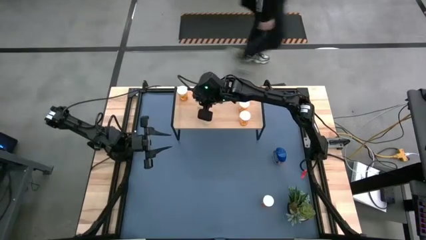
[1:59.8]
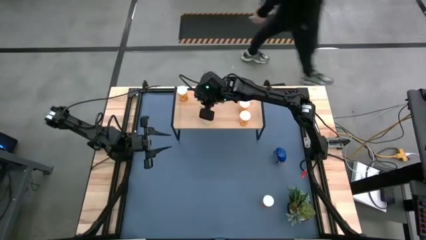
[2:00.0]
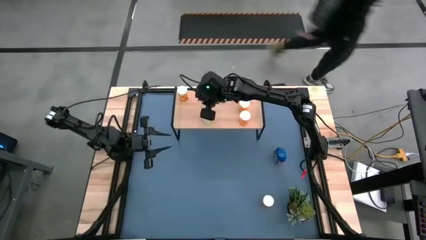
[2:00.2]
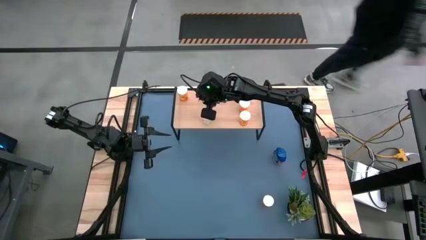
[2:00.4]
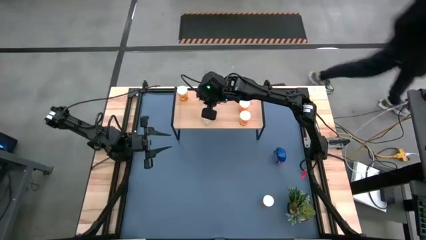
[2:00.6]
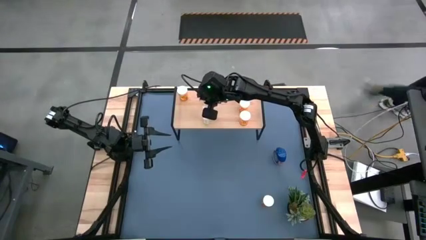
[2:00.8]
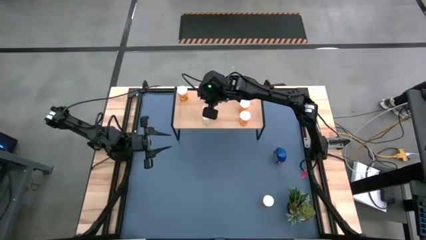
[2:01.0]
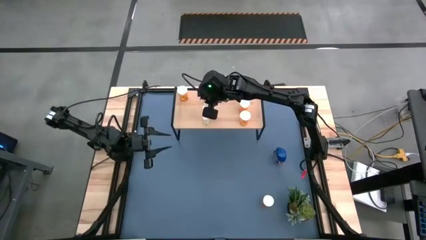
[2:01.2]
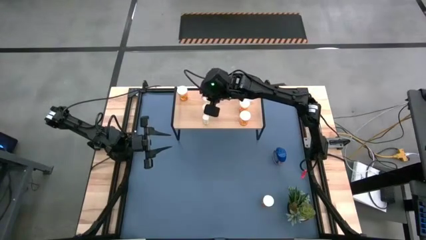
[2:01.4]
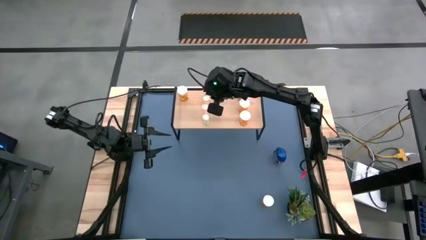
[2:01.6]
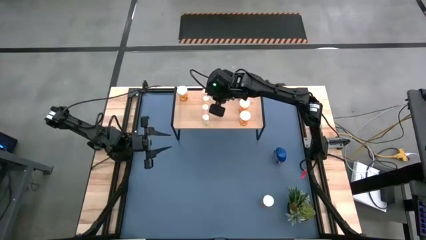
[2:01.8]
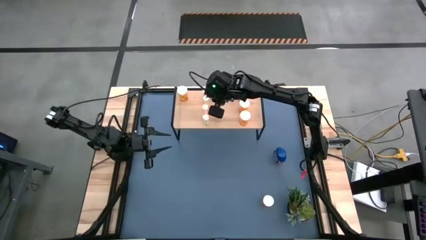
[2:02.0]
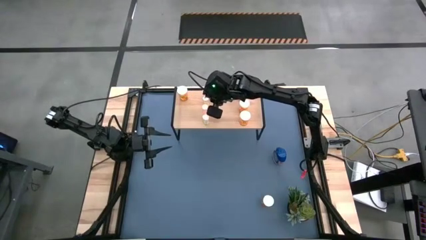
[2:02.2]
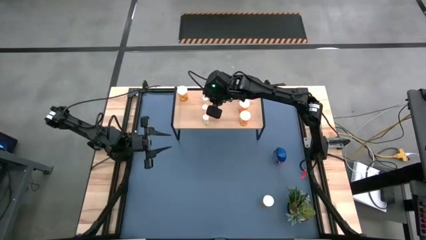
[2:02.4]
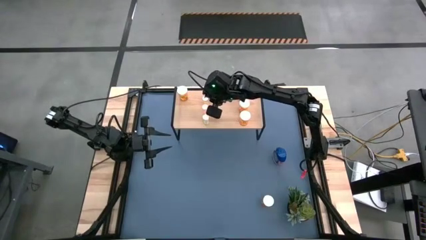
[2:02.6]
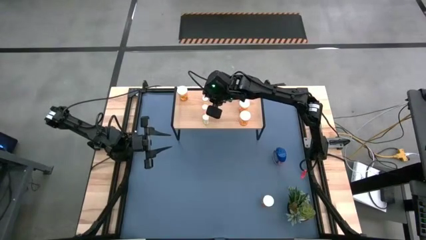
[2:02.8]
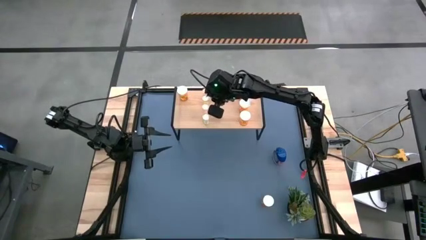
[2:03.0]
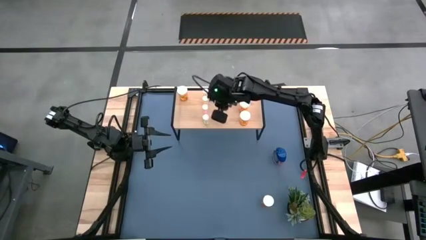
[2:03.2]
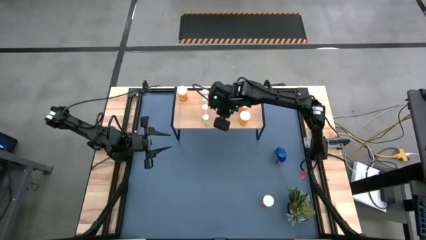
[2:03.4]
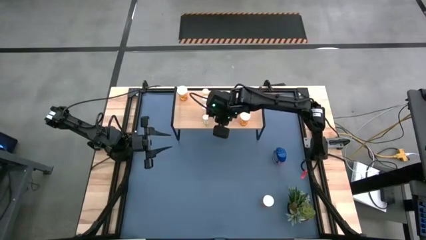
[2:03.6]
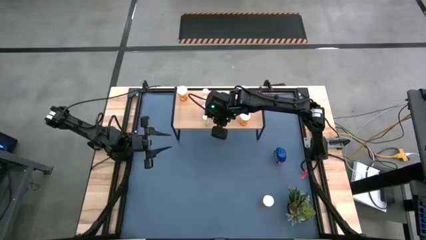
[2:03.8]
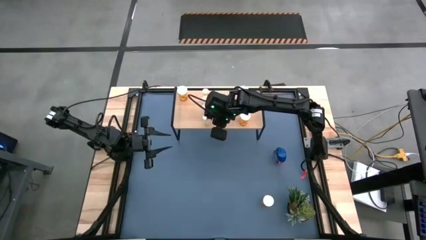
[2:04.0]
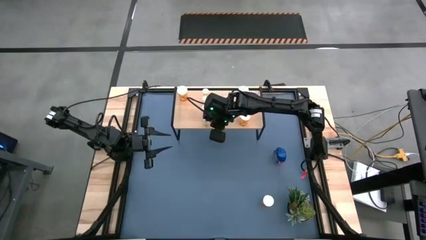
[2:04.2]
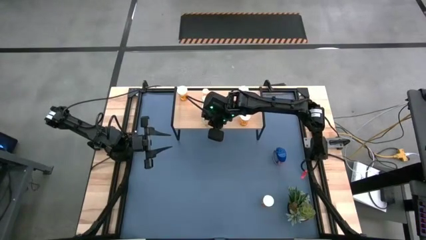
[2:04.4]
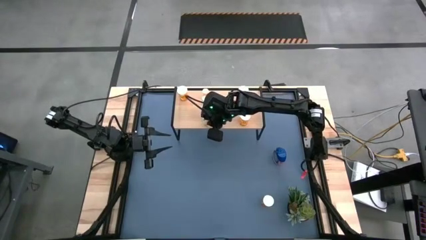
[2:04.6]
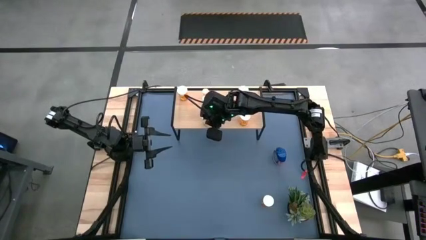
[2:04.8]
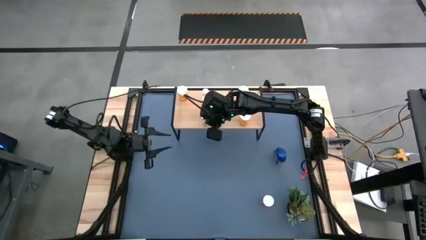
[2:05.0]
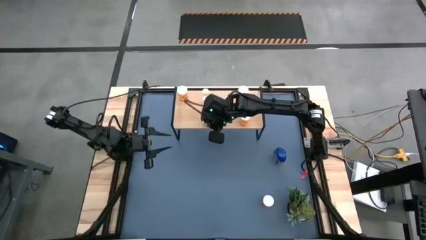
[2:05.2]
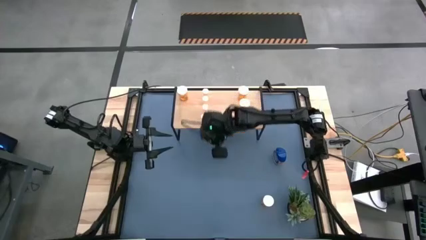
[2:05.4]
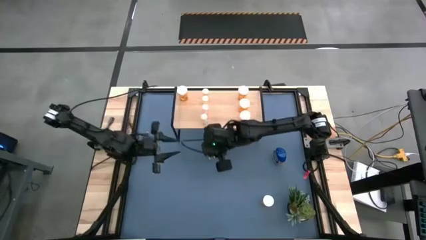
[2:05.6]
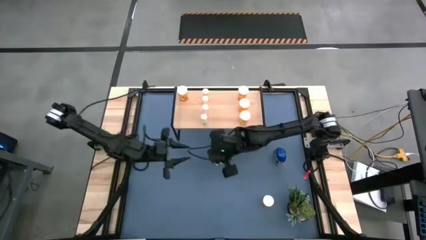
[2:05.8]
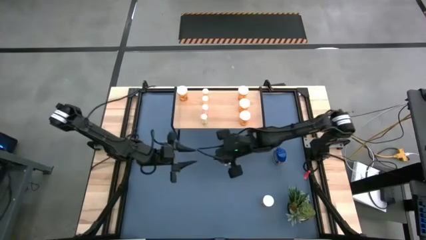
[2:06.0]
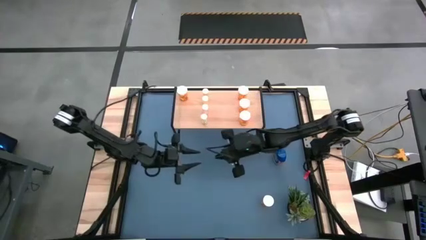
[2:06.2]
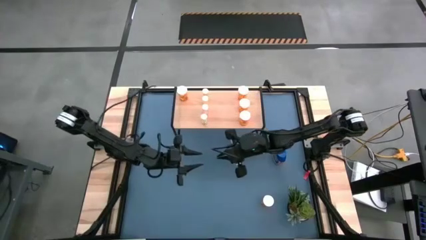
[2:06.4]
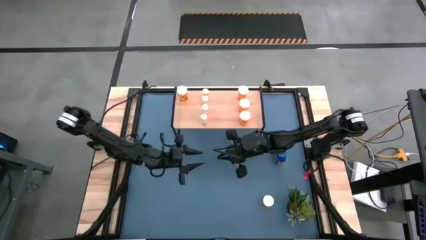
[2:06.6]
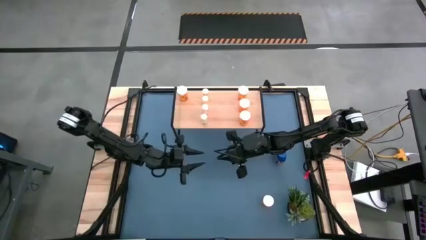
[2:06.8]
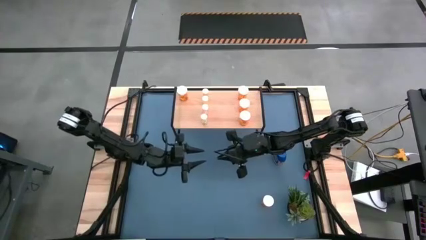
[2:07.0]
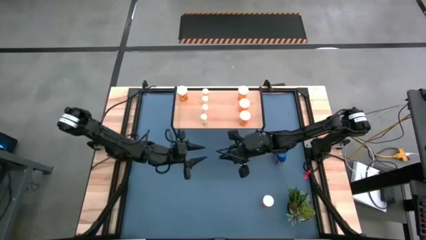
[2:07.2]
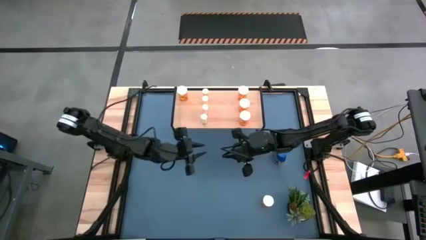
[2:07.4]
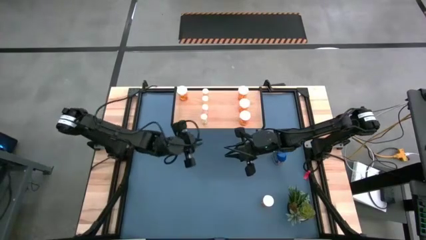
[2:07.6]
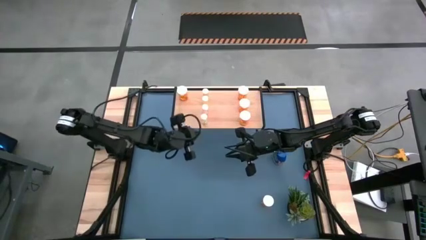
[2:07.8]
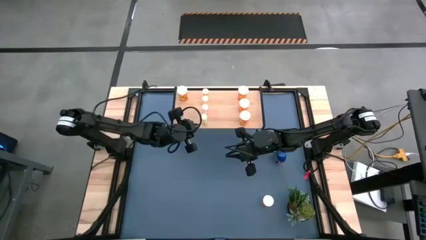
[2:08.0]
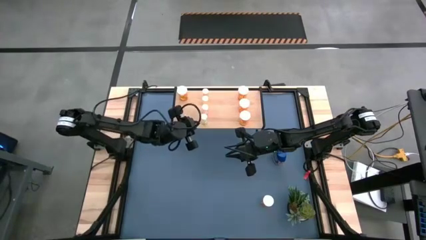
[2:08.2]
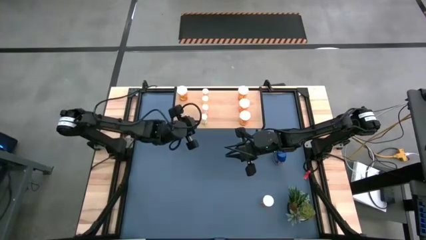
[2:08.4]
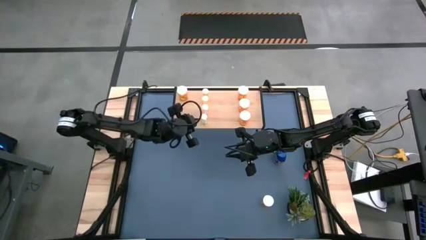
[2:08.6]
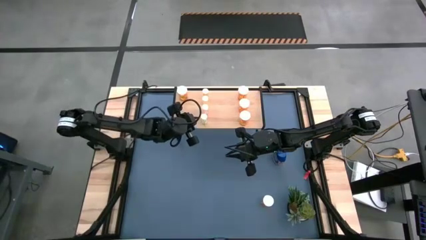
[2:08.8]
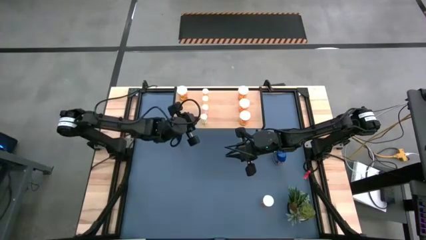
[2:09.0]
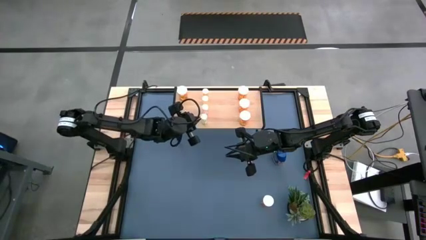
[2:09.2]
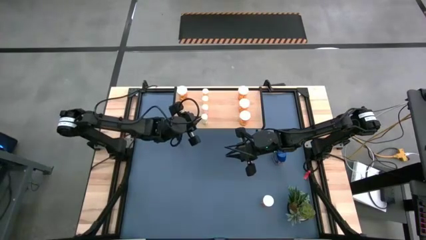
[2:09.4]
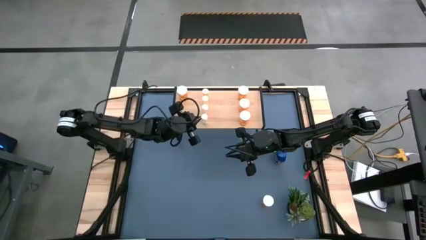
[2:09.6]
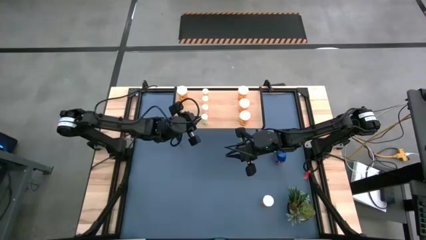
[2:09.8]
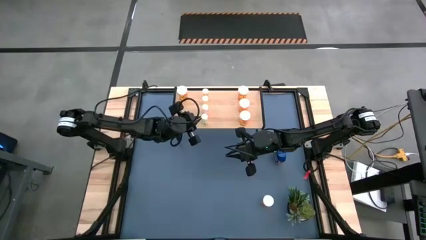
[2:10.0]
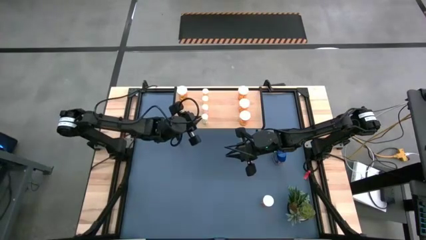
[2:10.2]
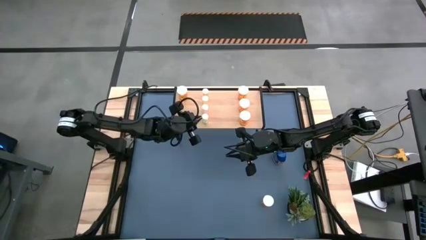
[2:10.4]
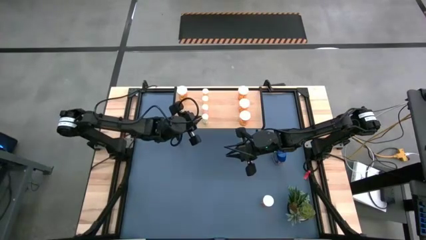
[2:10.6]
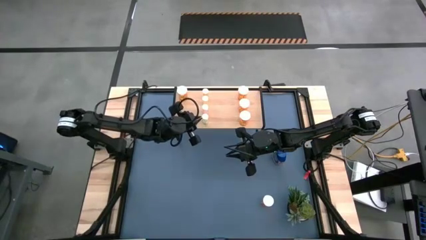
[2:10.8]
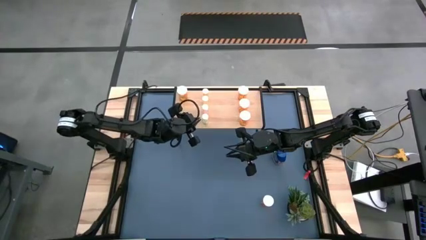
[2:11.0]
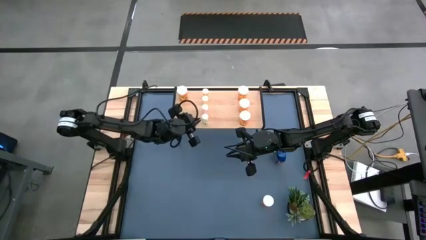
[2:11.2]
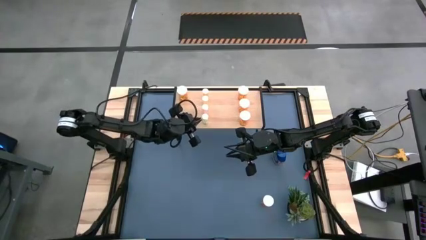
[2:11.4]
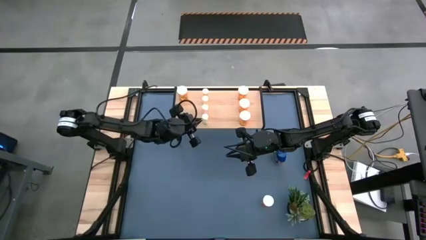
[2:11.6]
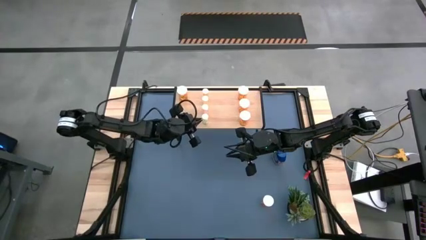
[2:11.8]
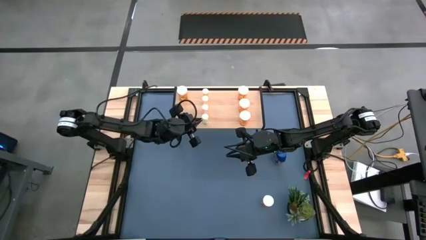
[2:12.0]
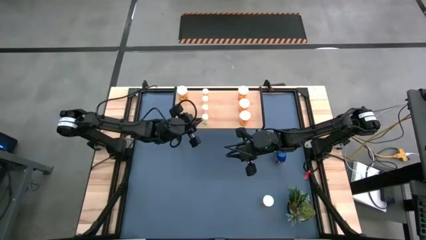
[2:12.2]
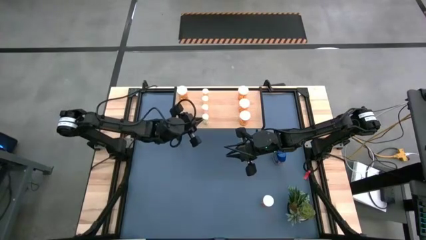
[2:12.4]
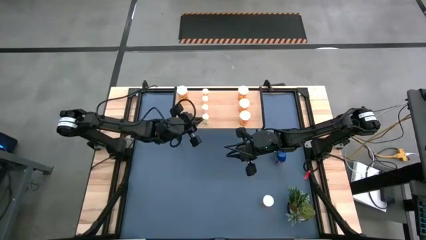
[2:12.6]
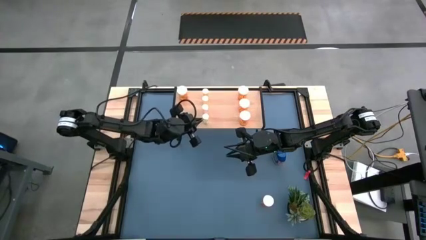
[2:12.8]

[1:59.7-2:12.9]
Task: Pick and place medicine bottles onto shelf by color
Adjust the small pill bottles
